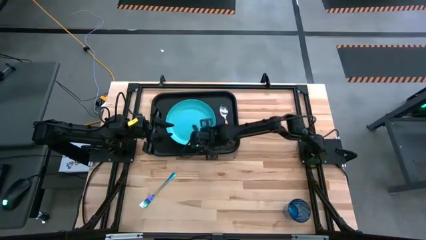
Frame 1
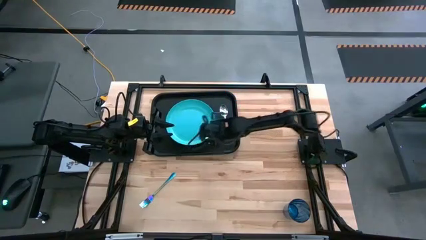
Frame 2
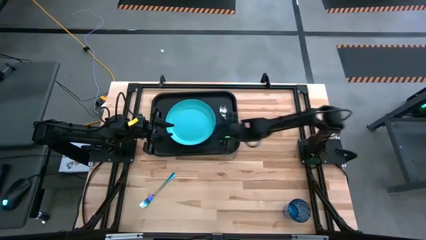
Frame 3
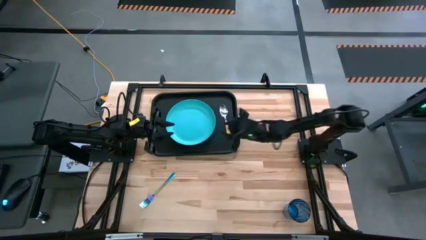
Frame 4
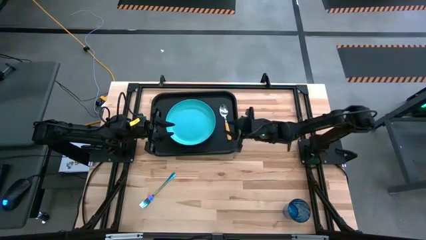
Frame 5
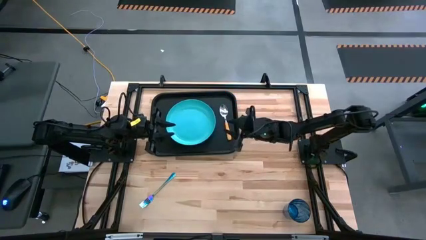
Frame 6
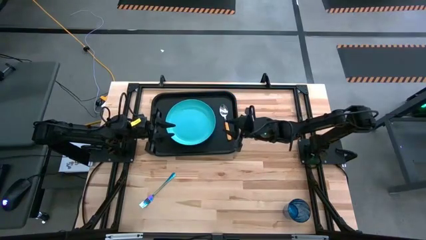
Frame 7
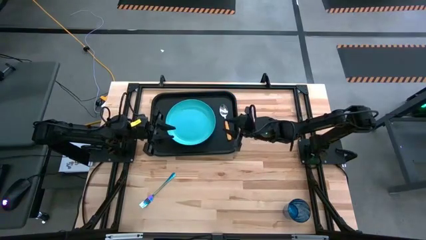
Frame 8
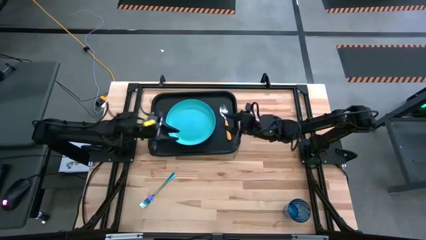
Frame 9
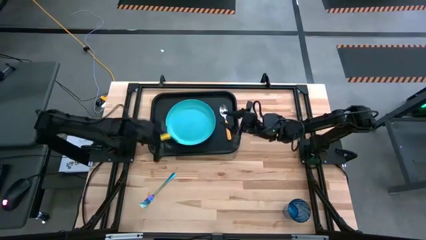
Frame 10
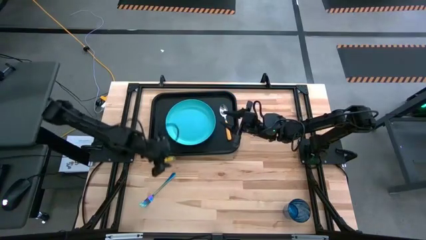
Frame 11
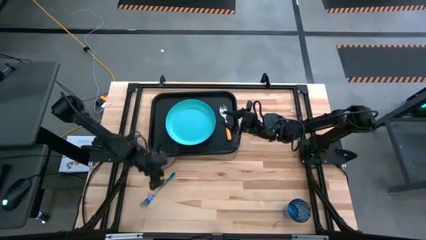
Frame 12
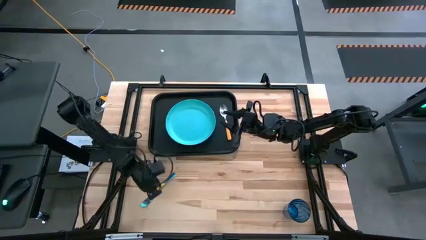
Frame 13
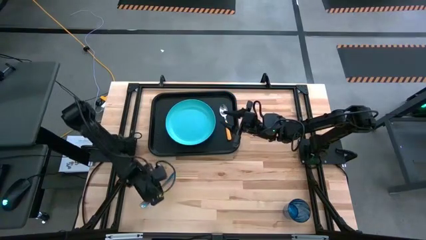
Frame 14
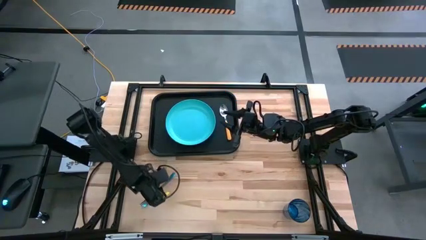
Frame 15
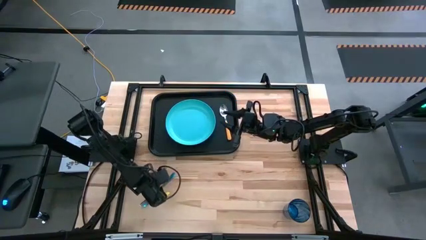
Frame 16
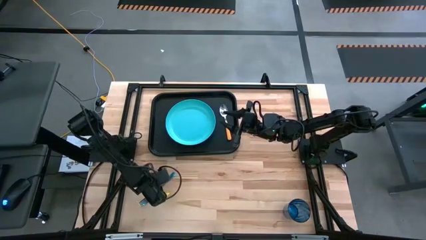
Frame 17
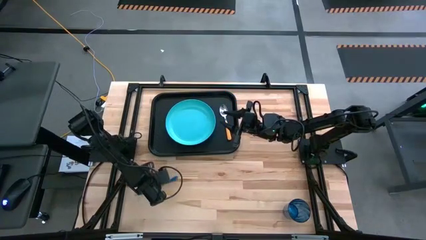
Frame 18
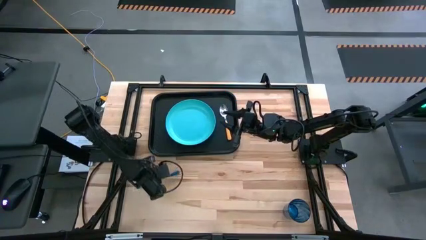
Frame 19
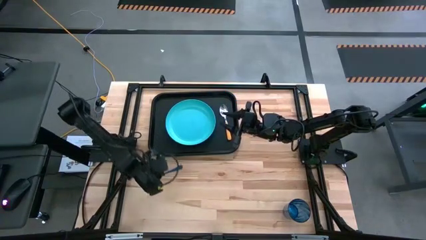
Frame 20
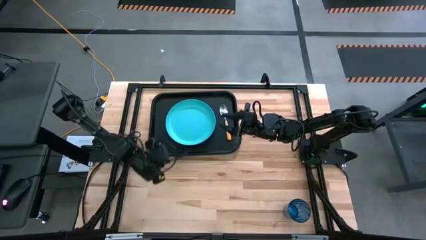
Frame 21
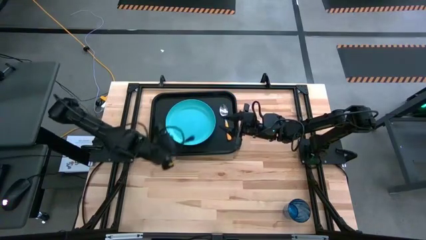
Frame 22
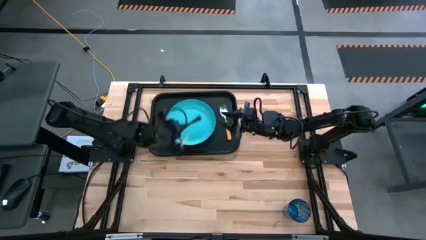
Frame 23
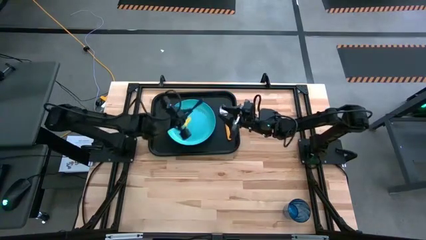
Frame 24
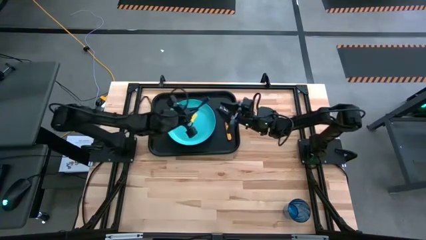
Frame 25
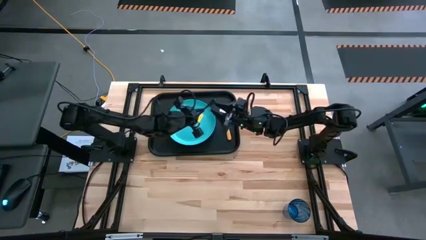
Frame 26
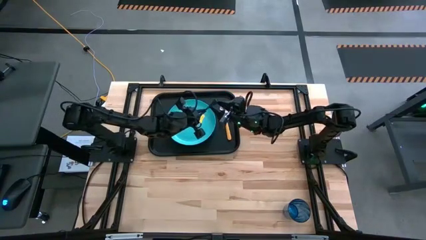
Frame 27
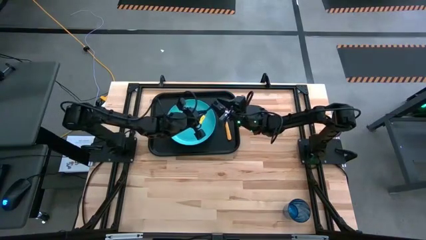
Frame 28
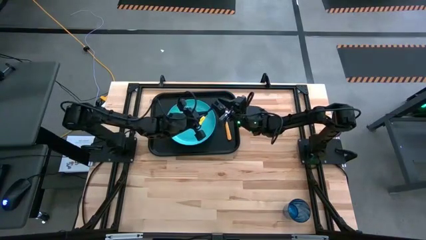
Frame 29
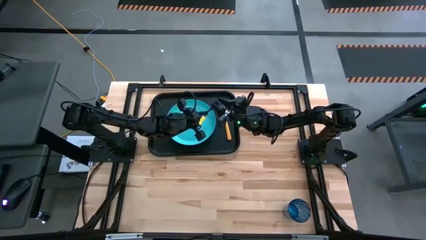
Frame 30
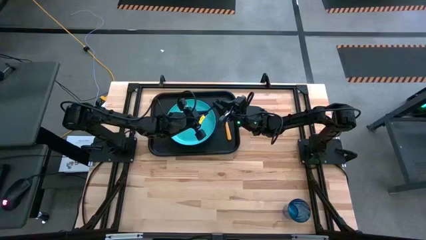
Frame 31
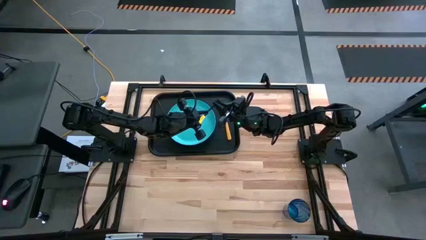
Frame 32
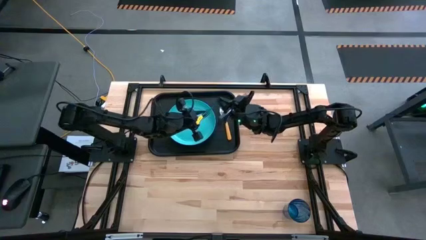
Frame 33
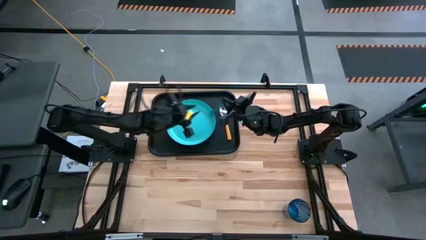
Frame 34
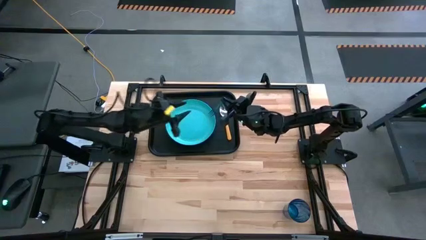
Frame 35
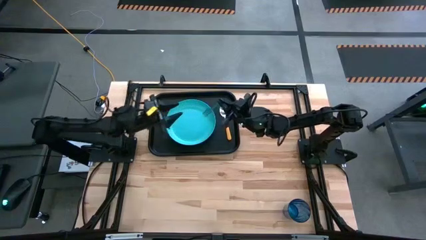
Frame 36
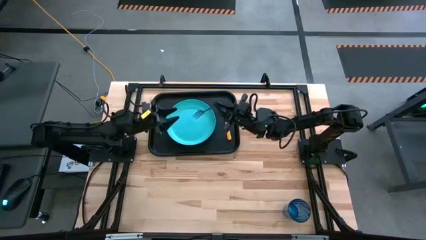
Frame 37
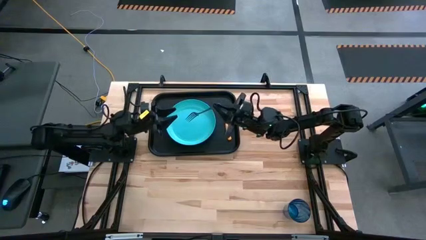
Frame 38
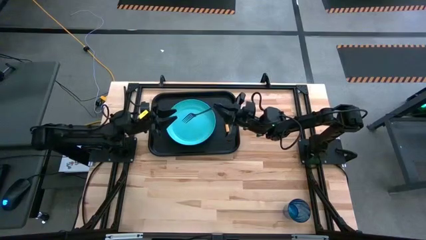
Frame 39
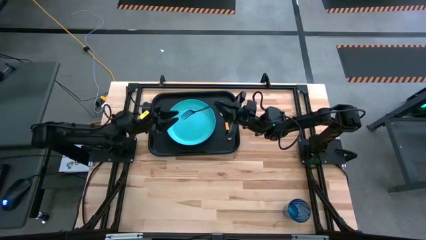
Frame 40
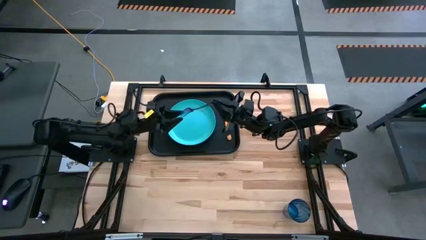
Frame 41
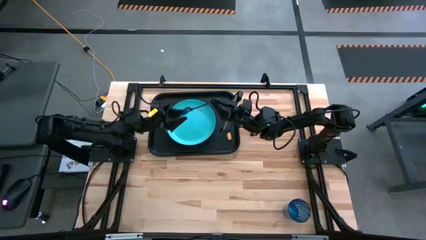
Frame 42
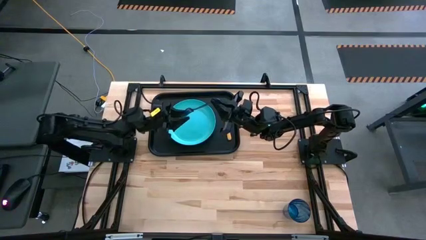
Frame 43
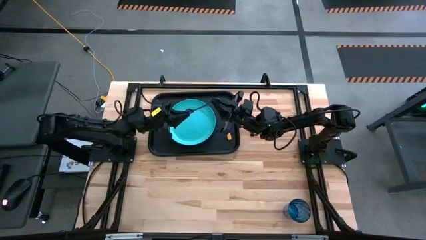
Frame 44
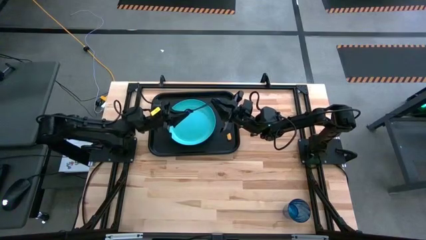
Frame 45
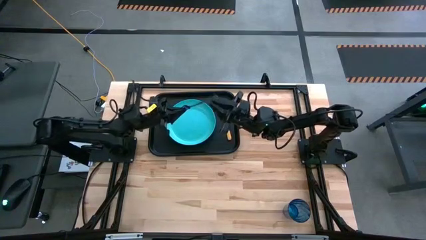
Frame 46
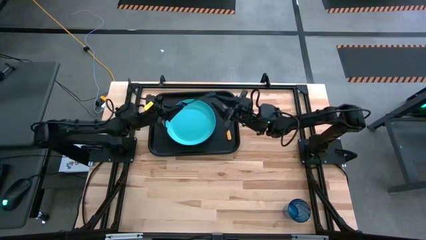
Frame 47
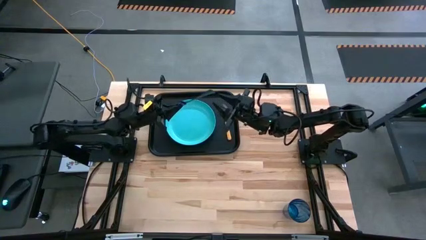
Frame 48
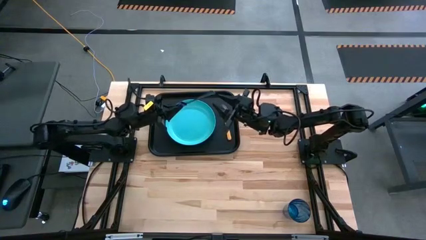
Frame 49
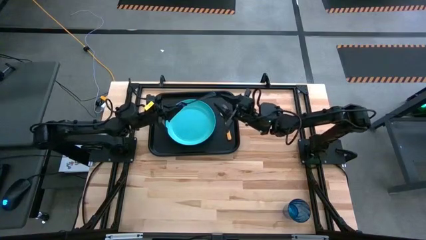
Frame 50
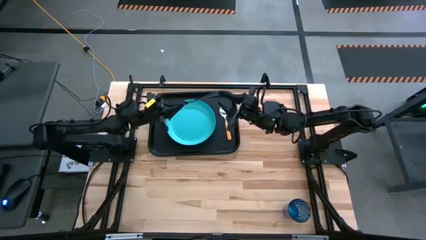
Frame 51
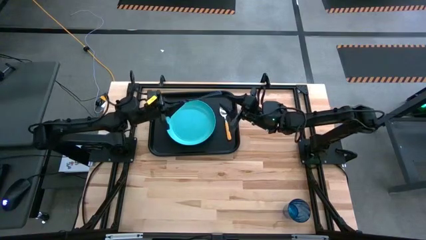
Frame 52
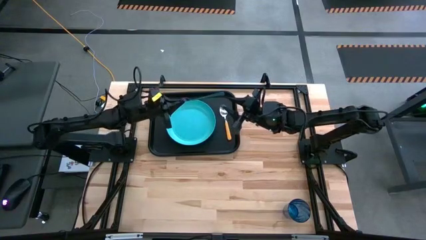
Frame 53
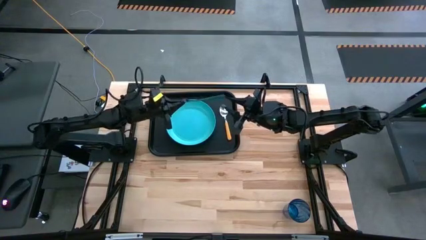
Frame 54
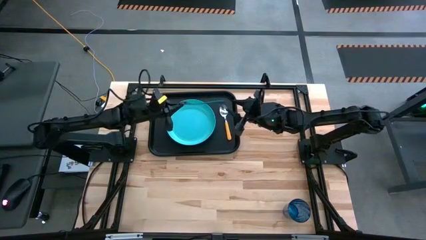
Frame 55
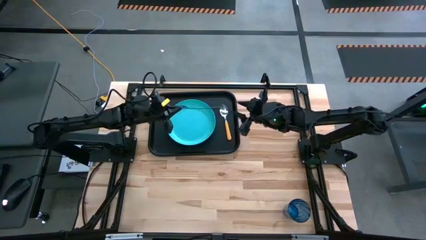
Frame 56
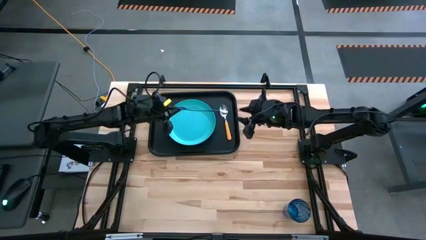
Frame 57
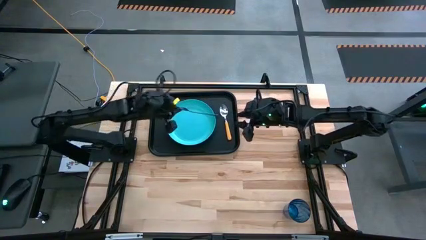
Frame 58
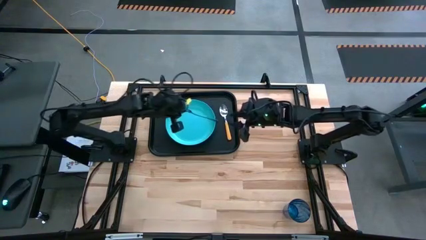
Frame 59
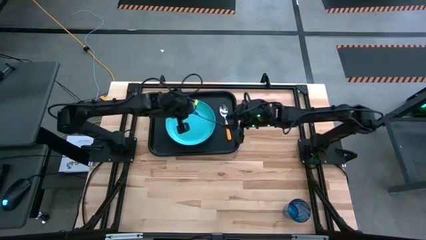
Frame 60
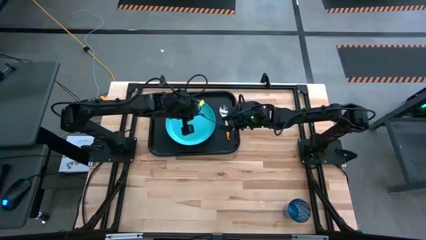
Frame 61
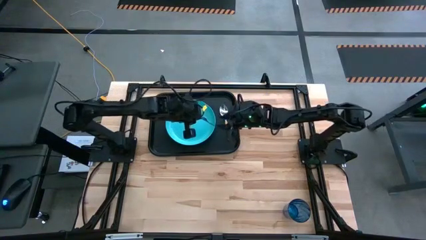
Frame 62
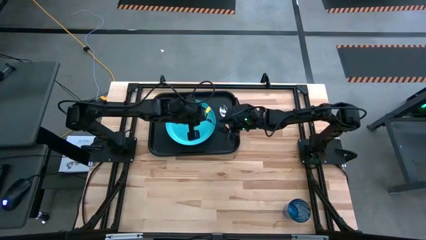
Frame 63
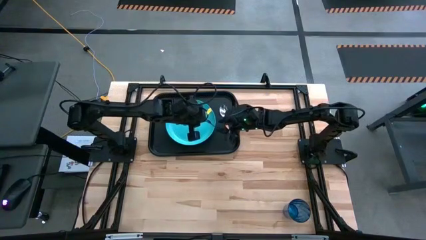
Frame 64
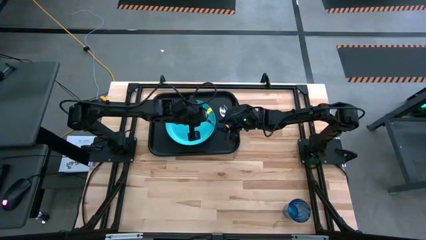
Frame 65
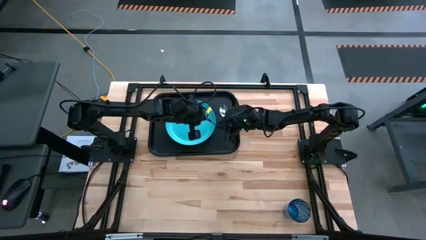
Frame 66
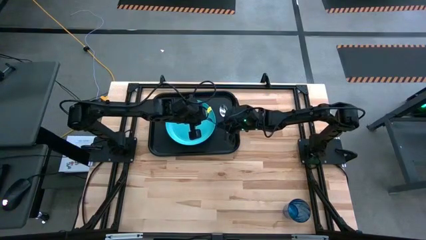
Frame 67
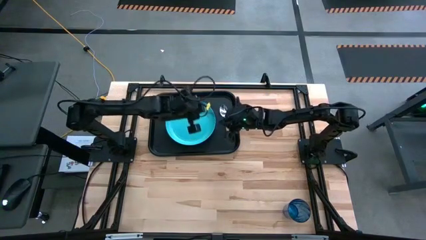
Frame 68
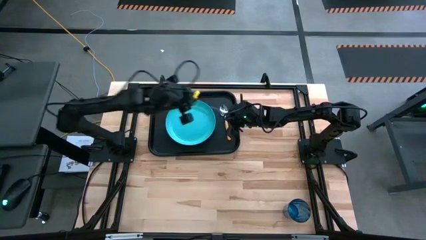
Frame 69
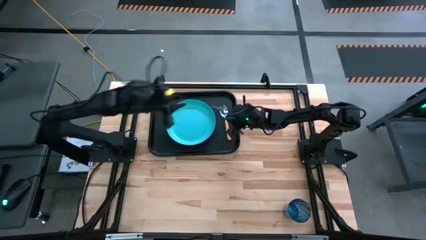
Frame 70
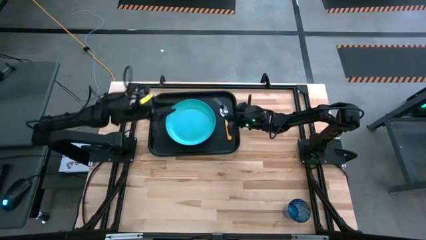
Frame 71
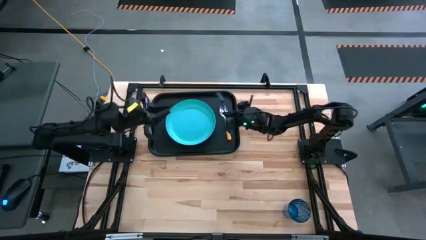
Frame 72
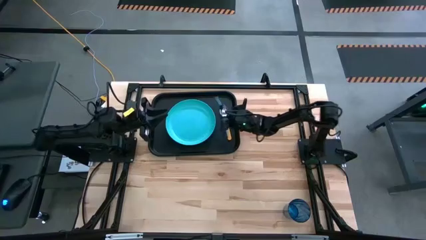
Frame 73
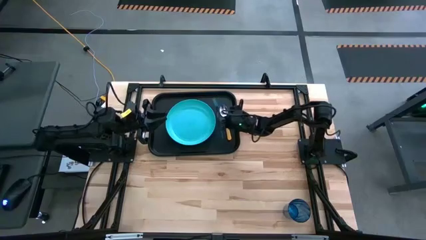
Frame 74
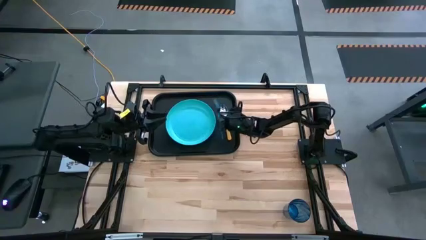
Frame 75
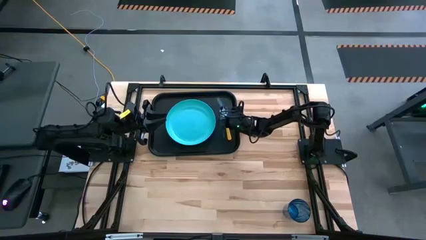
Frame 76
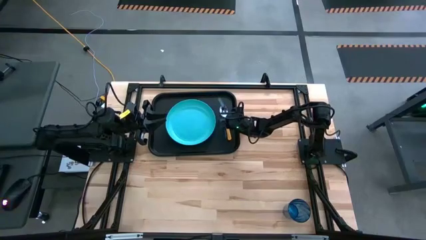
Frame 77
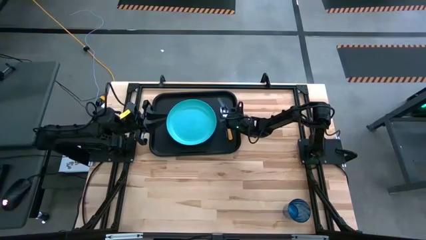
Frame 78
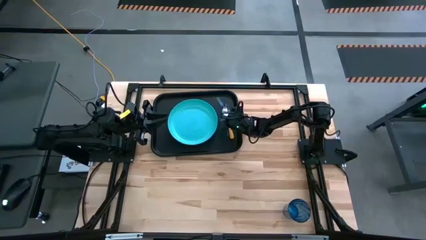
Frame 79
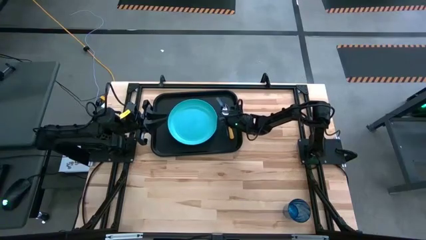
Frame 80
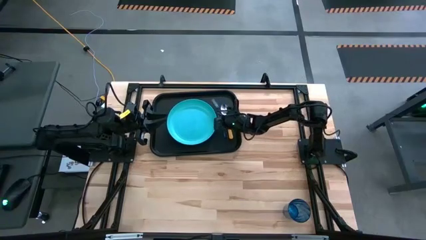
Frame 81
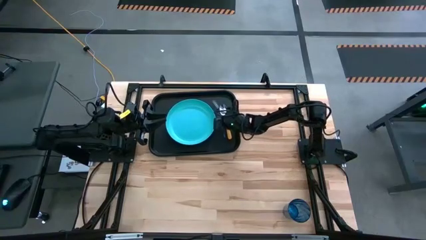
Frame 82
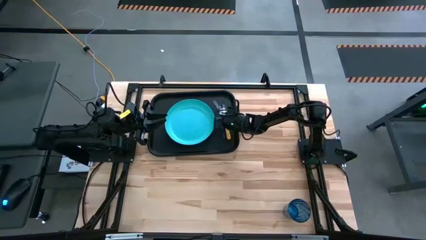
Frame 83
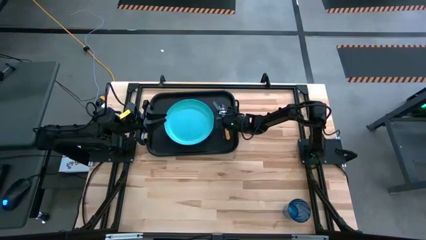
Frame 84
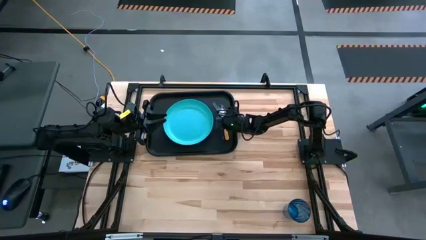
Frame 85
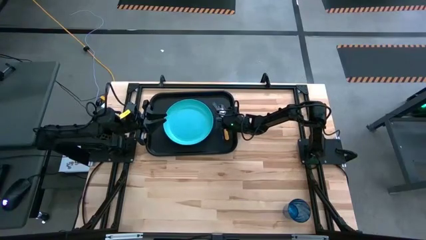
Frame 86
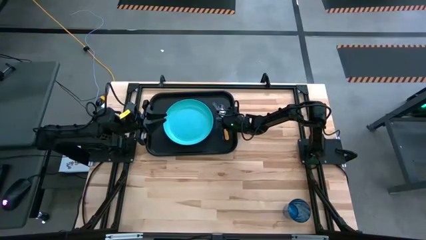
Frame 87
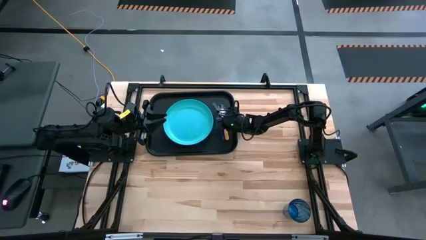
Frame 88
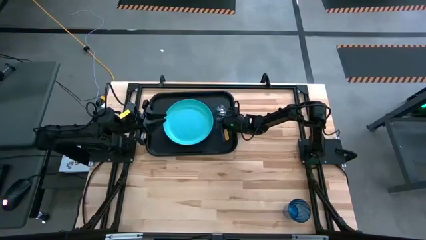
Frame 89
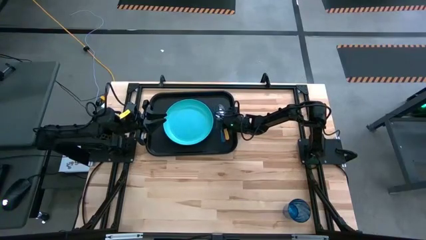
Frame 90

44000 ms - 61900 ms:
Task: Pick and place plate/cup/fork/spoon on tray
Put the blue fork on the black serving tray between the blue plate and yellow spoon
